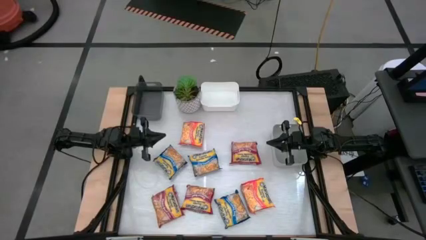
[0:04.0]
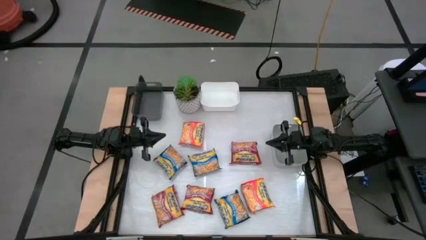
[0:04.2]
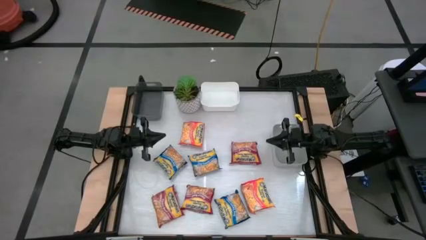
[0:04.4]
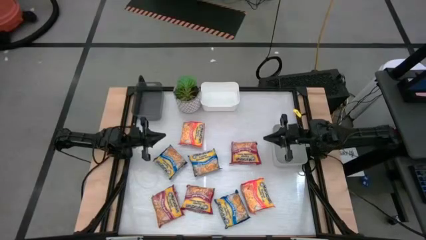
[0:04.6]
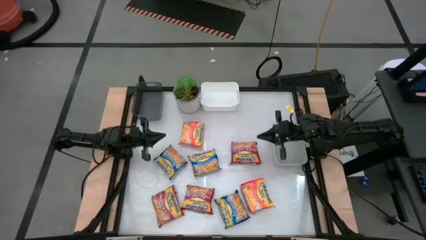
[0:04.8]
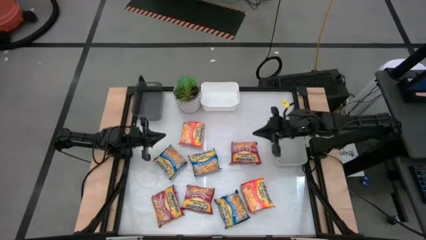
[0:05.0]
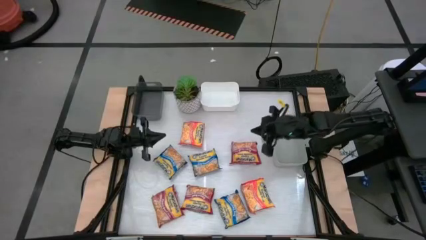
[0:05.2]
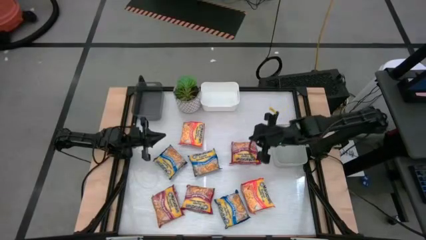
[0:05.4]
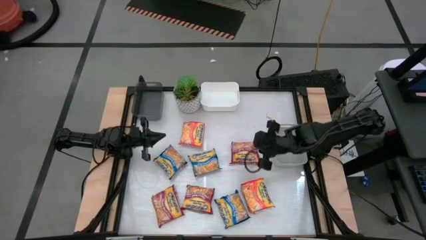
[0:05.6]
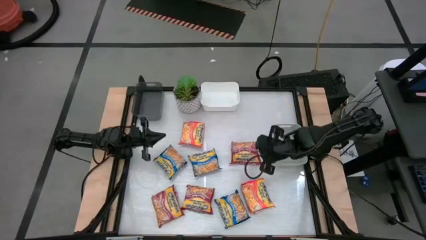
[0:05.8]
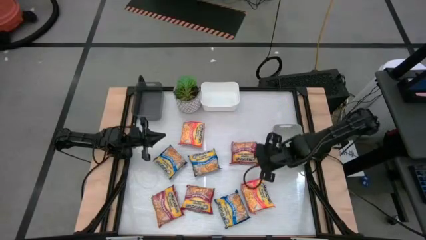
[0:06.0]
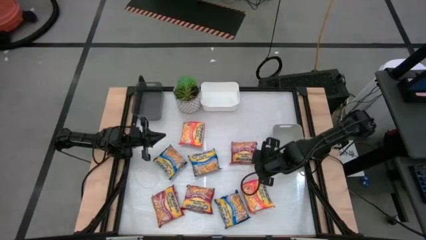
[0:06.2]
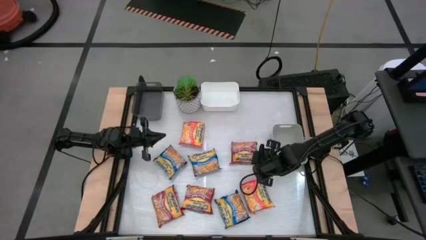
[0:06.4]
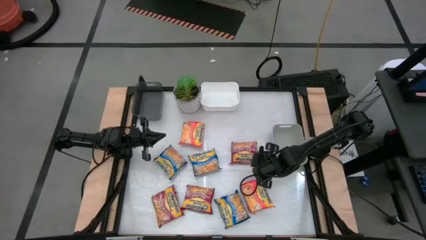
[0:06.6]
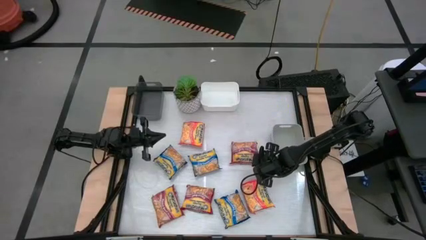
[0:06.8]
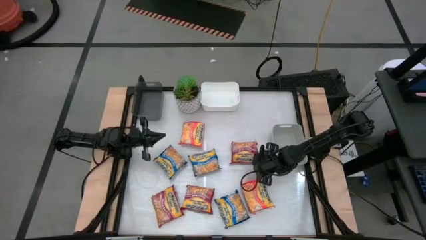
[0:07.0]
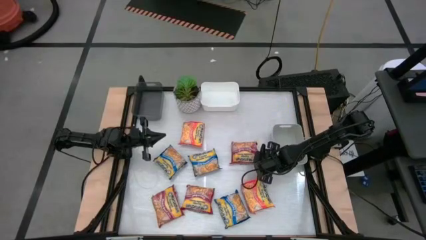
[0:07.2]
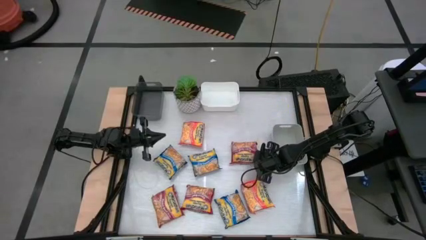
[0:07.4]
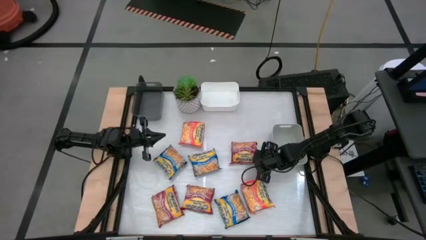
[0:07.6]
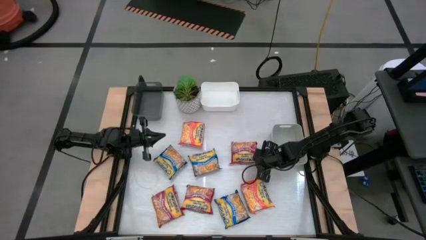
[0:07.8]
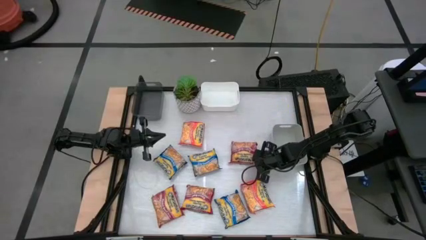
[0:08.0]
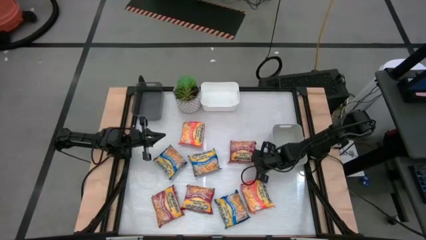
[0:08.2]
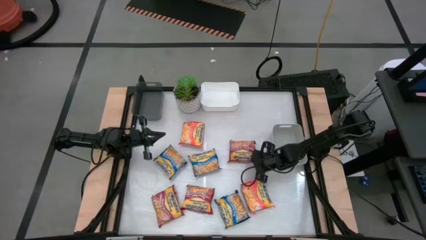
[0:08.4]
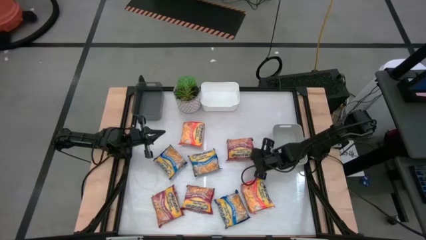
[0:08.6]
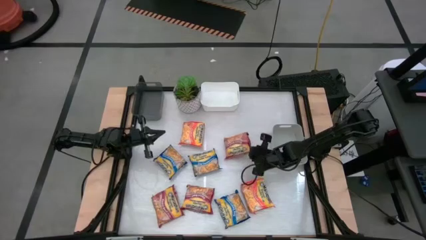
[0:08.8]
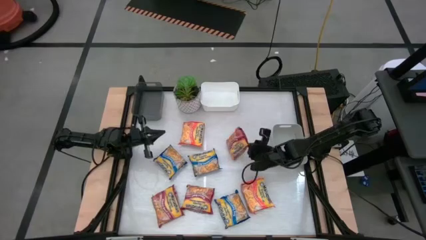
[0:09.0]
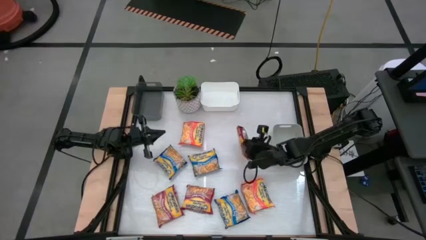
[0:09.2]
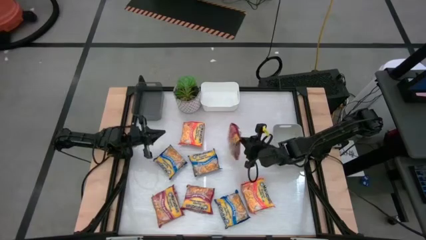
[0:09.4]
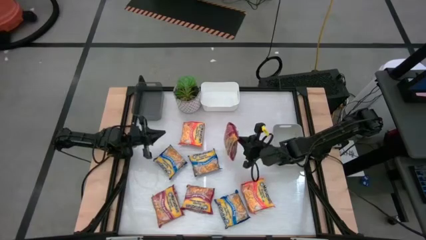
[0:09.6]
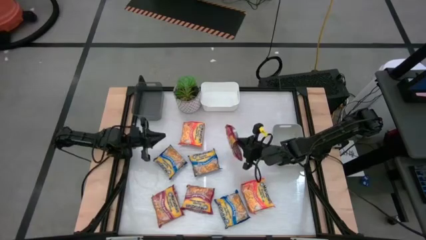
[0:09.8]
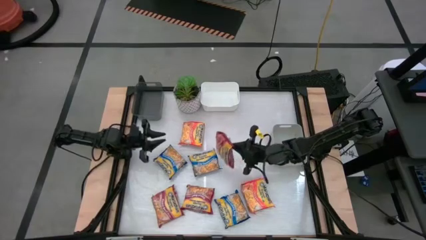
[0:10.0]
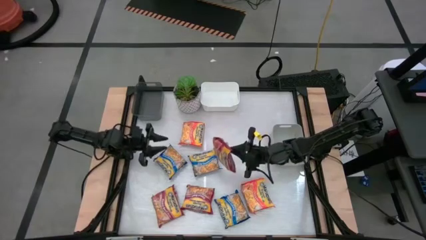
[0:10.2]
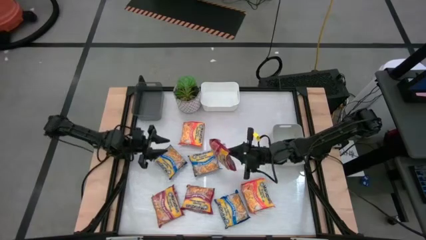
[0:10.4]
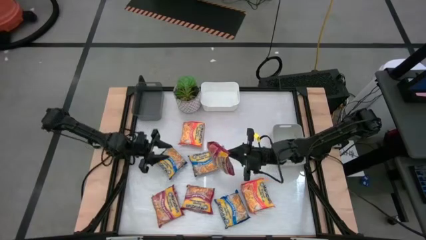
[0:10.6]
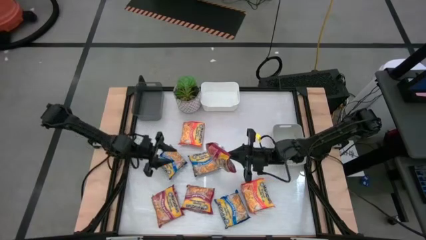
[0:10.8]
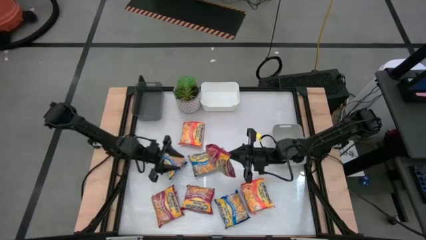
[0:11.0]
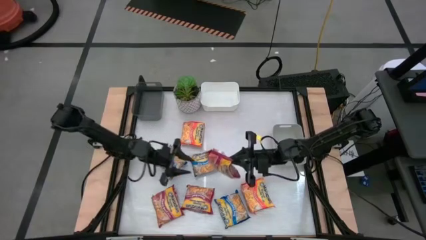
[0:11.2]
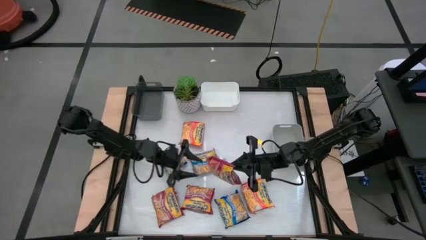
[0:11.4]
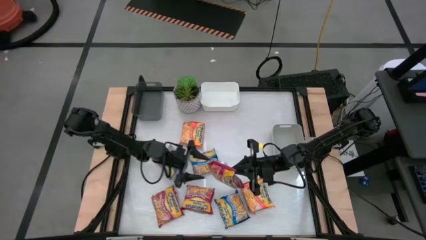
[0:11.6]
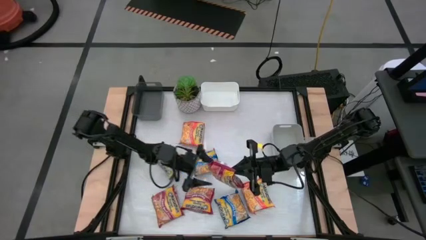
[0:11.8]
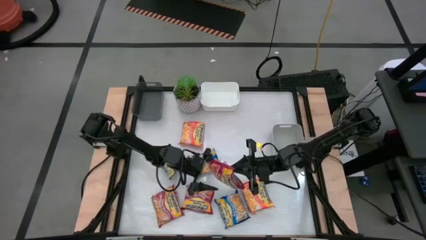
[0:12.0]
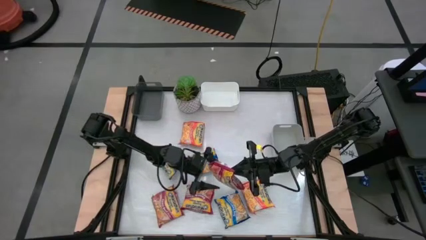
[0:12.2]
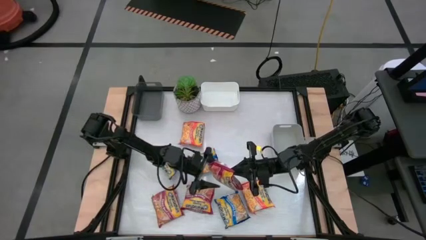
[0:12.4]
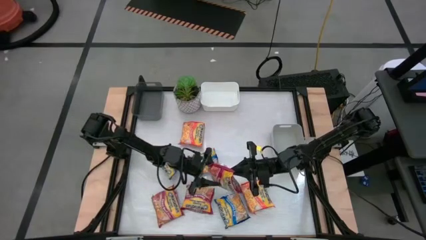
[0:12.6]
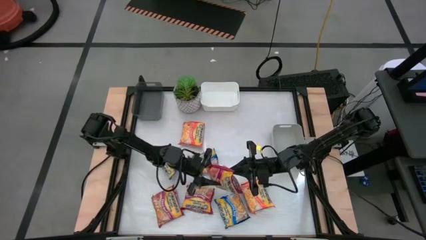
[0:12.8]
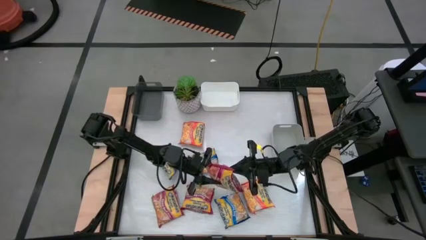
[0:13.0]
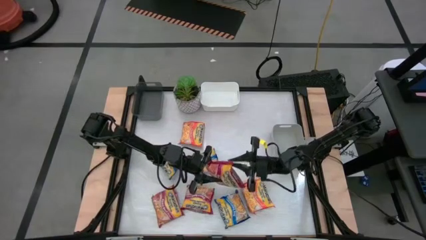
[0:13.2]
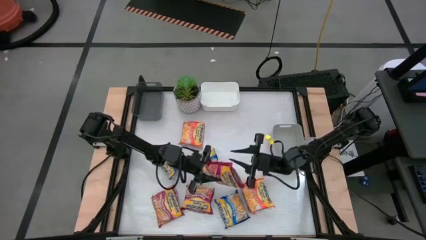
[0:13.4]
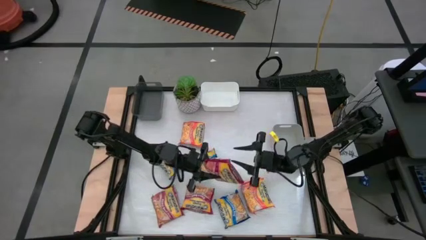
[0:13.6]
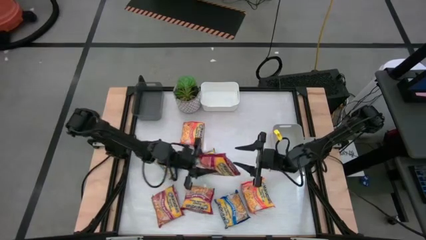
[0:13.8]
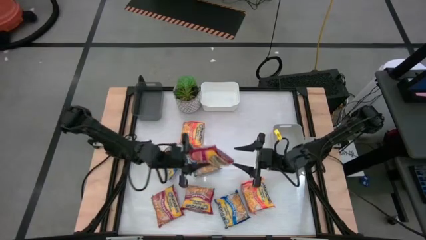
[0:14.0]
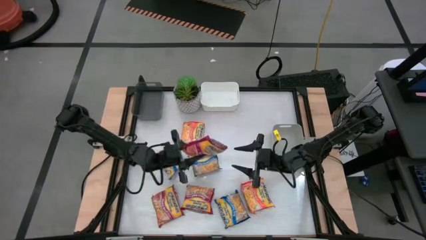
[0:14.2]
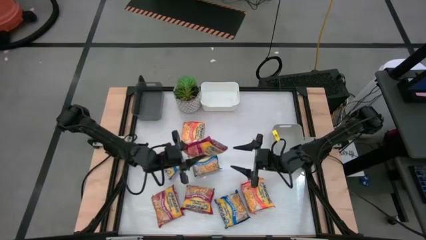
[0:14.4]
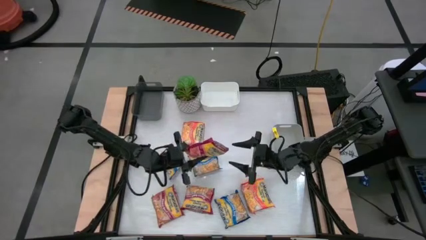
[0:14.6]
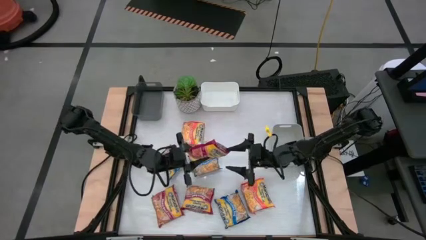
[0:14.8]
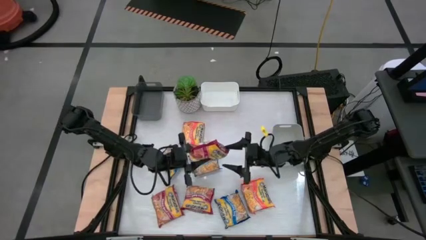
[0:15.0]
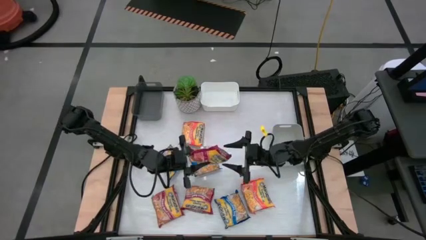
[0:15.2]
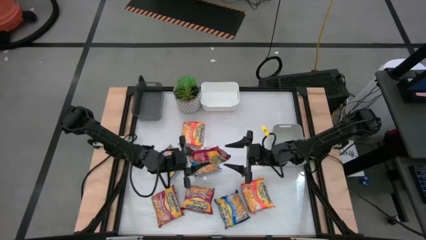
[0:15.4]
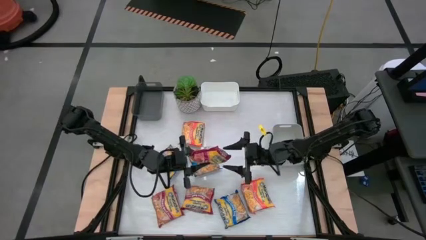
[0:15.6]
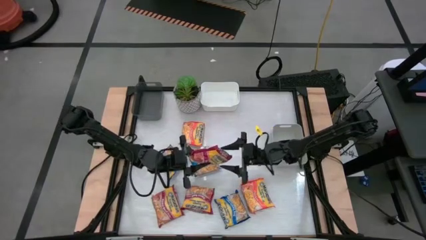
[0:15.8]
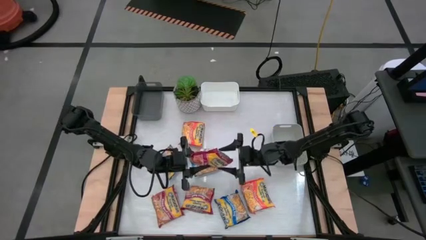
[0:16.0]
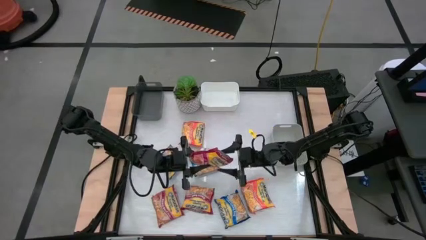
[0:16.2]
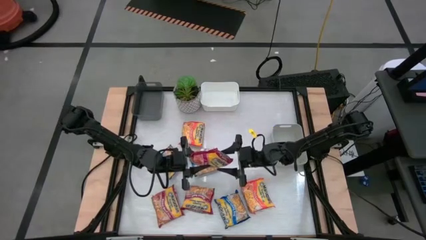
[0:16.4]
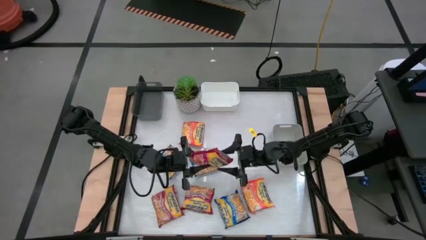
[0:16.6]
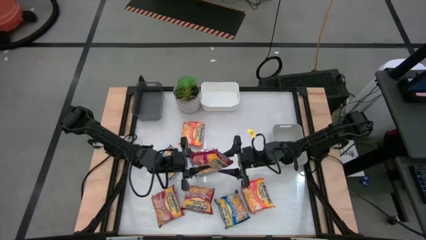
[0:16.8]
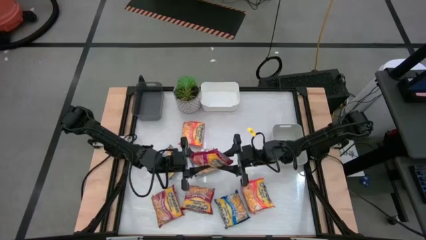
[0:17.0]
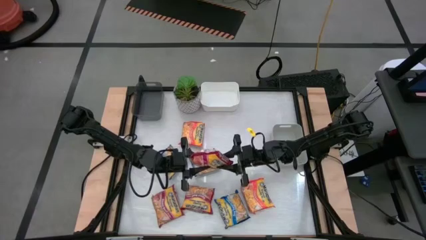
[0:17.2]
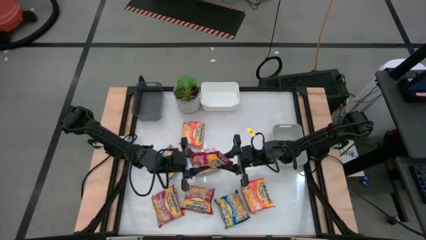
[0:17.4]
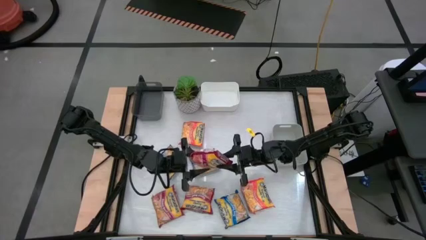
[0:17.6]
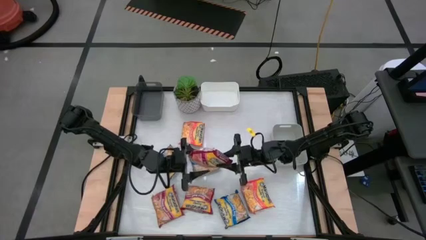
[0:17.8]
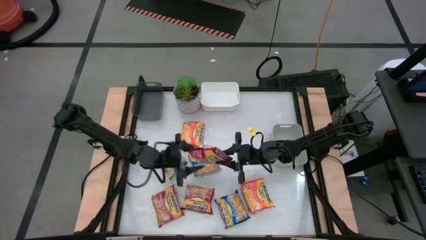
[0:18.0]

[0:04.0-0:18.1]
Task: Sort Maruchan noodles
Put the top red noodle pack into the white bin
